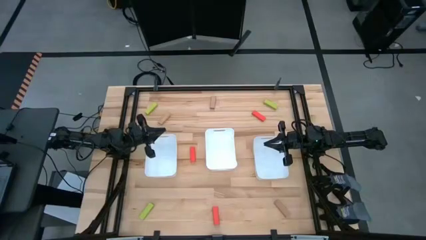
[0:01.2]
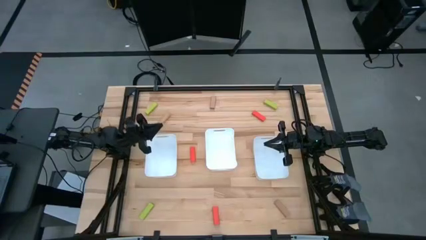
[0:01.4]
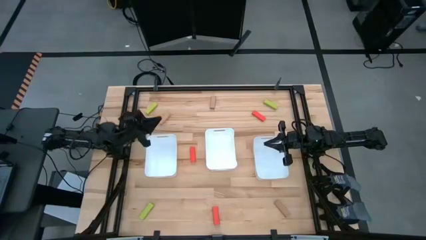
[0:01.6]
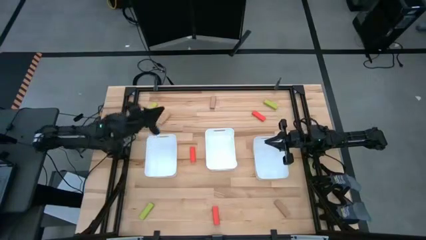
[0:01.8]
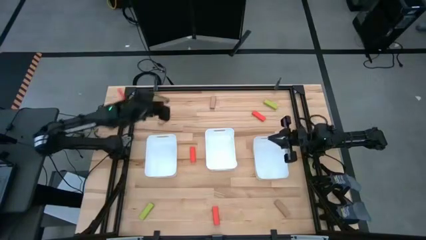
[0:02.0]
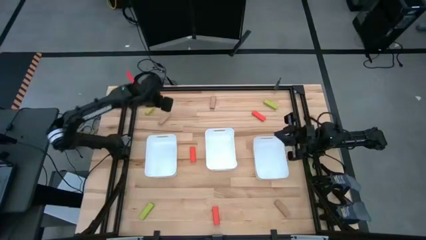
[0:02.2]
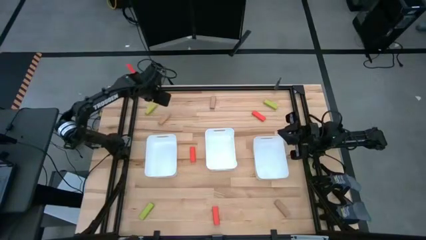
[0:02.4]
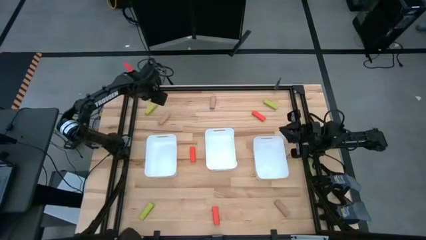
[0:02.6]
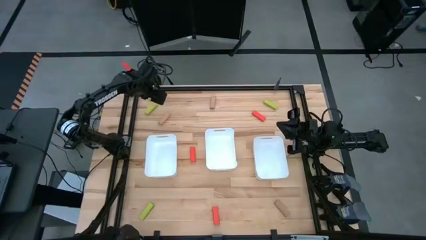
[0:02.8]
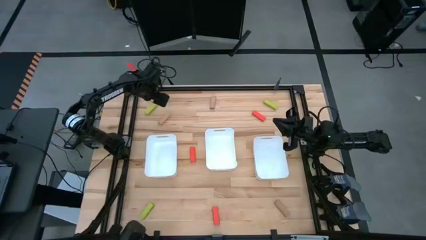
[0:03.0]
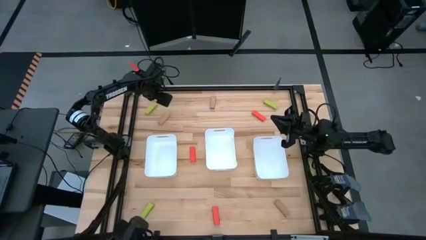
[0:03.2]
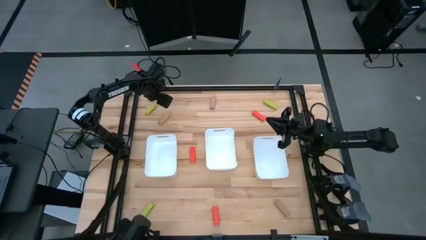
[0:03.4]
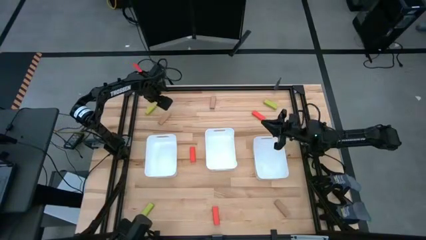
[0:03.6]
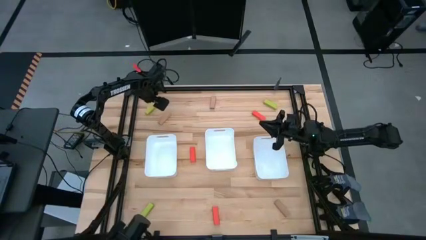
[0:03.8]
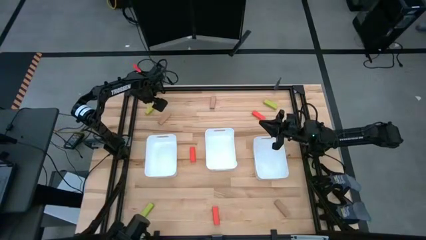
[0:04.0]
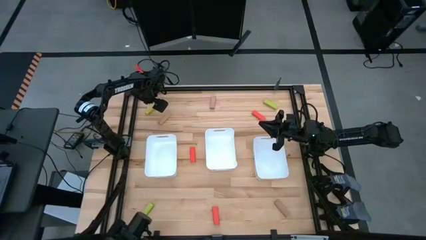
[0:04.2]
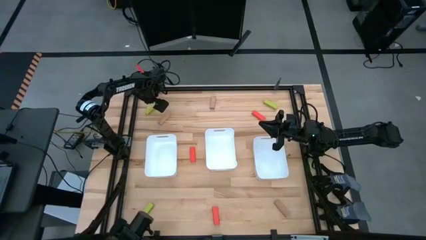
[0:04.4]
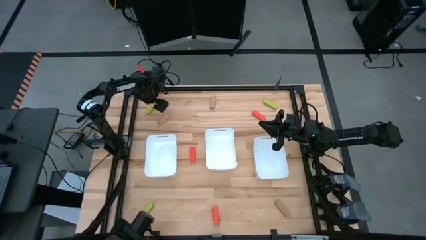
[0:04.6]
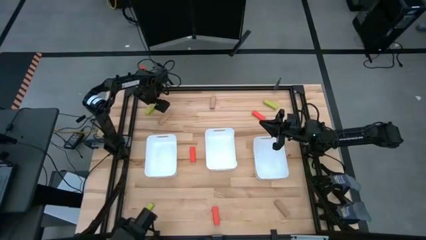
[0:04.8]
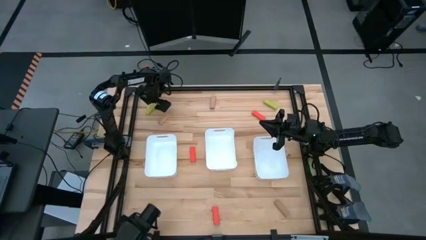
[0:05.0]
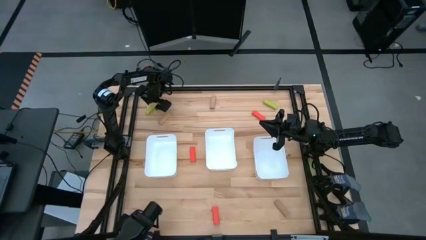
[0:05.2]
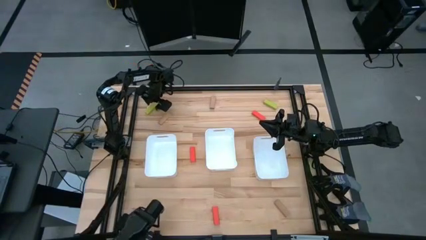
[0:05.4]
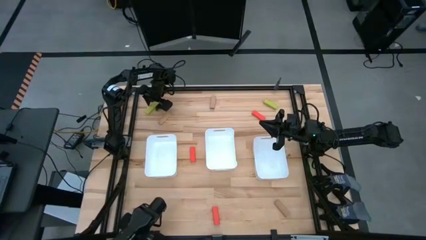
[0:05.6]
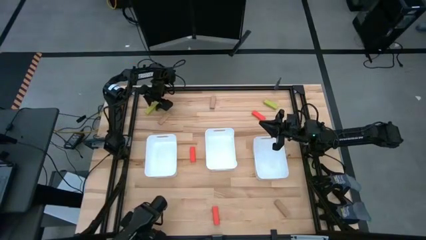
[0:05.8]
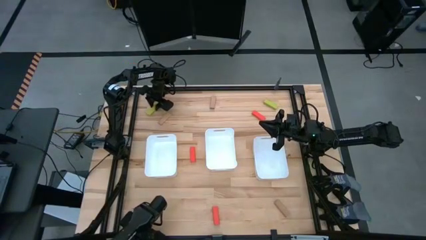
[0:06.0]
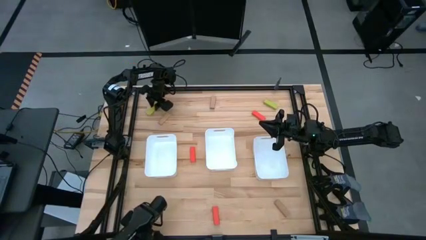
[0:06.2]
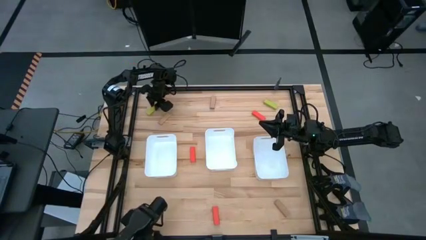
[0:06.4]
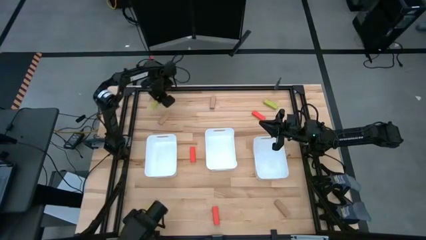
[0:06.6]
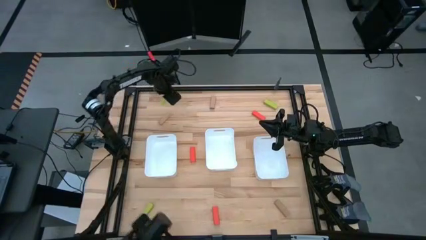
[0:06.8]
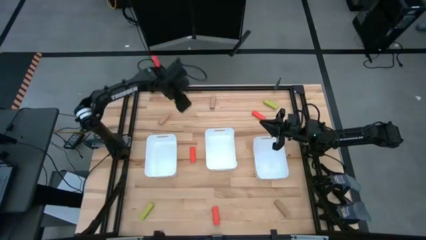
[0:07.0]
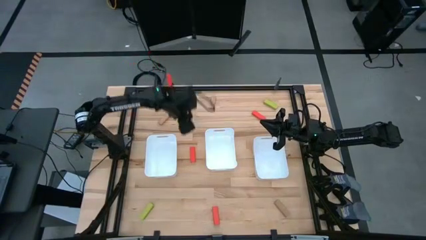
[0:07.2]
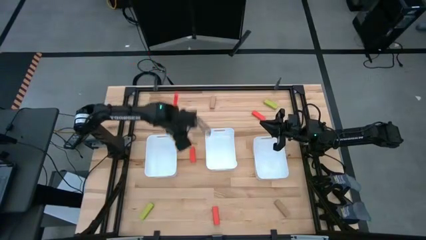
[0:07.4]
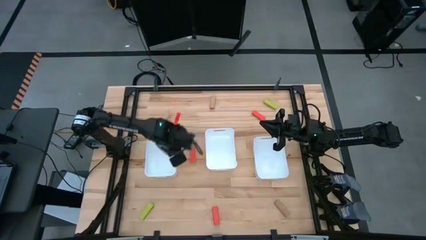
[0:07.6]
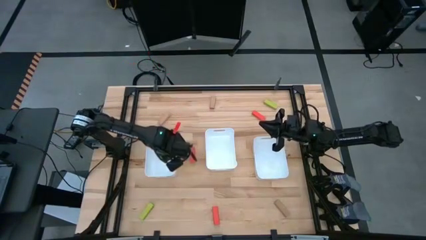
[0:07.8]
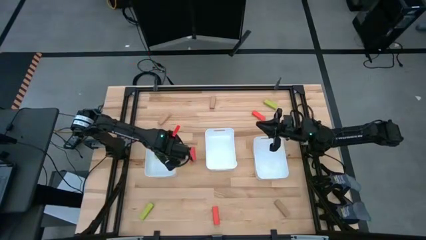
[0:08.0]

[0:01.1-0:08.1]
Task: Sort blocks
Put the top left green block into the left white bin

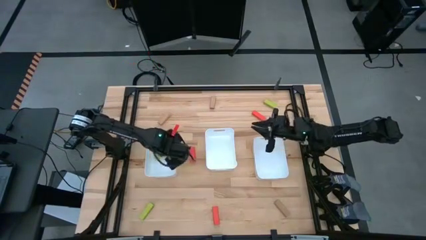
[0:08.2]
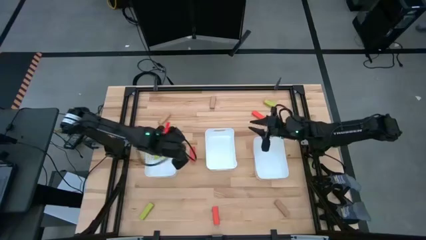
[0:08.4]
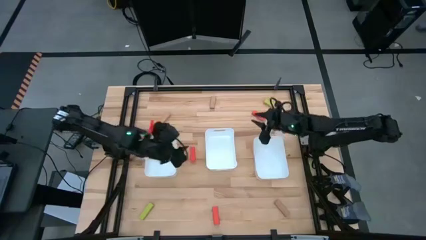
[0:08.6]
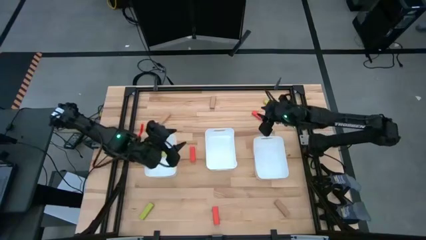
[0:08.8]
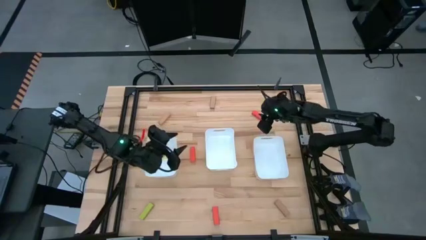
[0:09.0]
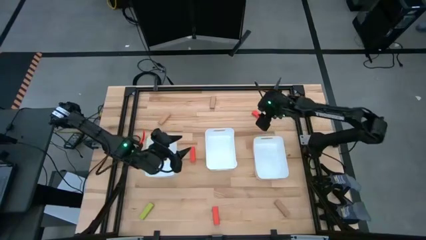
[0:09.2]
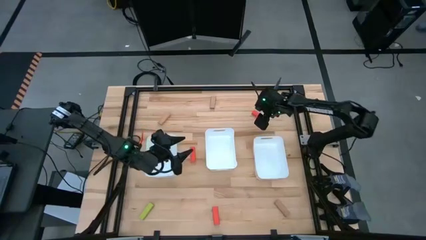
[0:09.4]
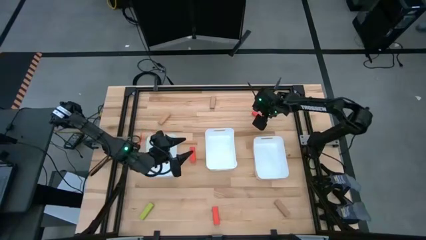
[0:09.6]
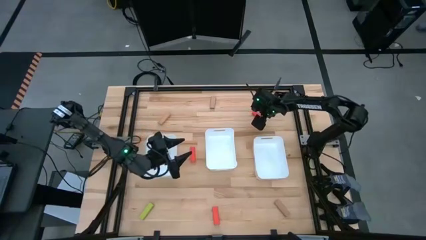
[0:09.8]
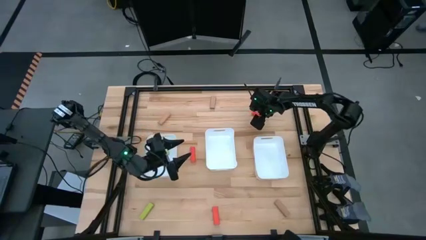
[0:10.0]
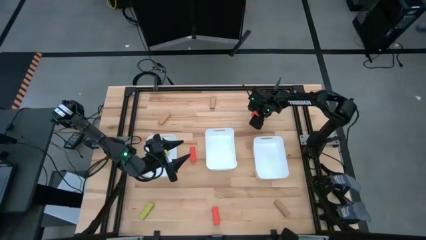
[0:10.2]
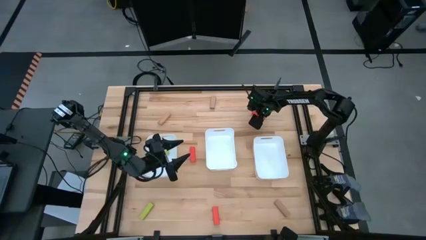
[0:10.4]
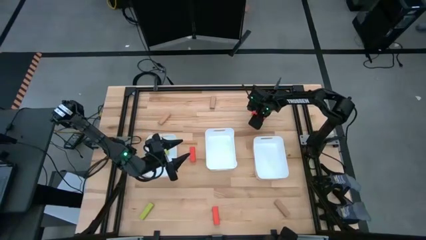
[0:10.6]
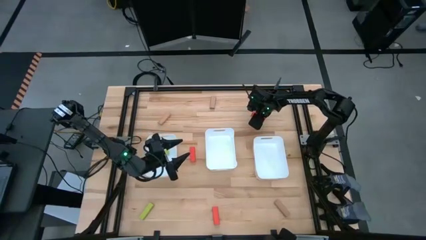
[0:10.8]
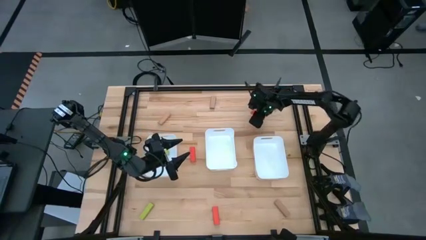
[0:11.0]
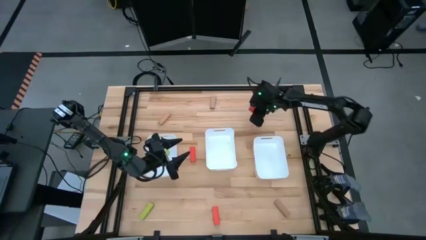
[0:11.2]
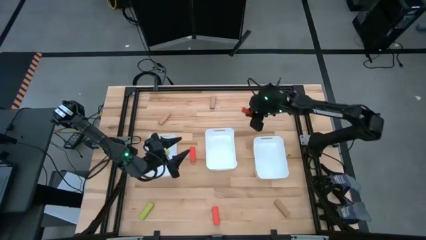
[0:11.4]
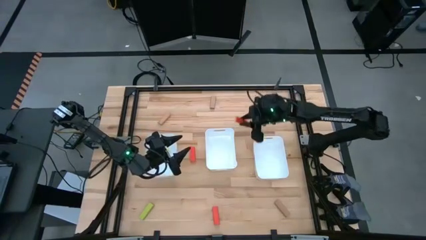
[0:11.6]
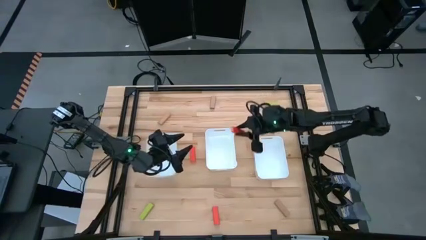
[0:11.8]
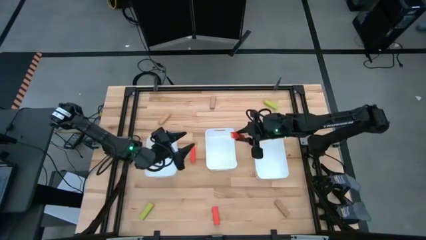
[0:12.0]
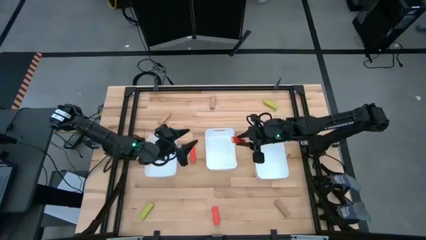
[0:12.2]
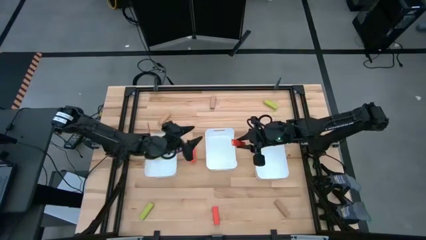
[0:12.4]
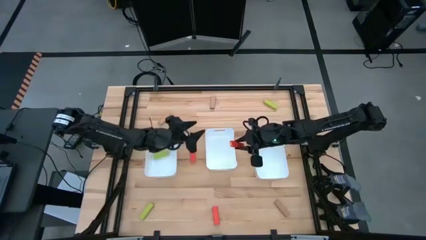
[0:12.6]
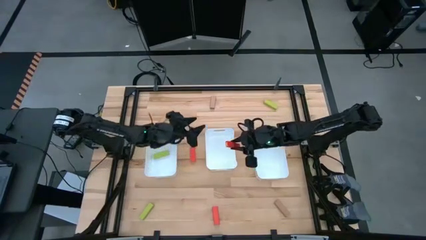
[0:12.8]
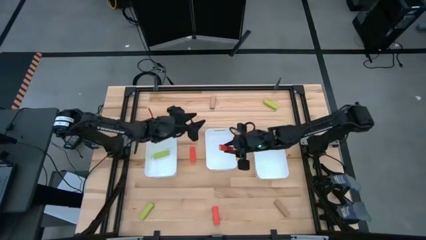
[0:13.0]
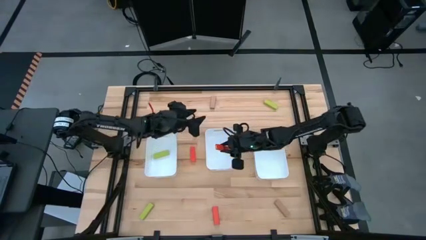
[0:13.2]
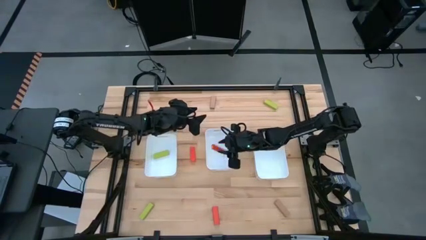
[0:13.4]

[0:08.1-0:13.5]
Put the top orange block into the middle white bin

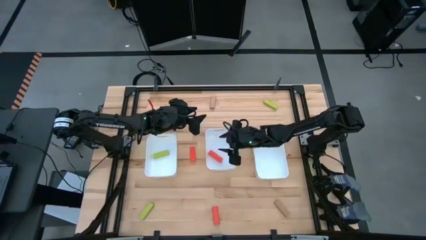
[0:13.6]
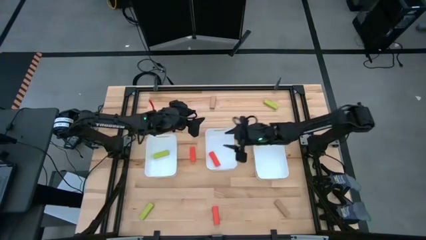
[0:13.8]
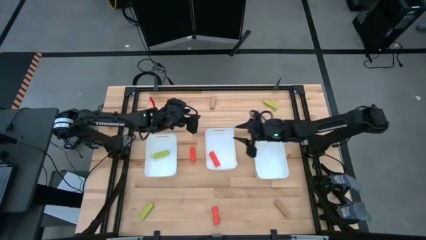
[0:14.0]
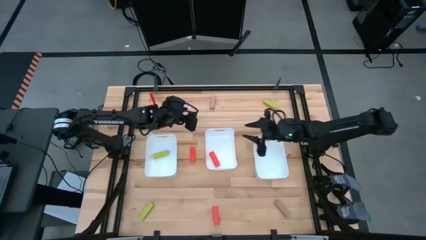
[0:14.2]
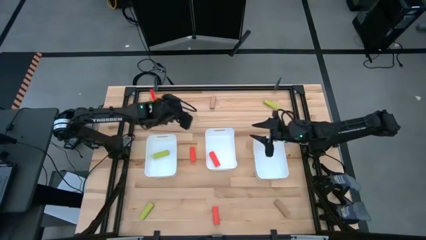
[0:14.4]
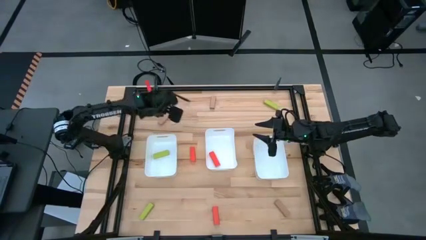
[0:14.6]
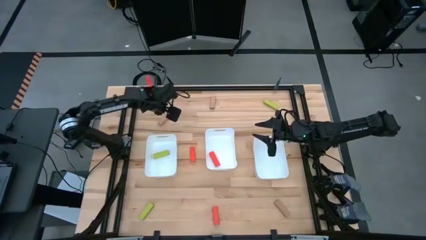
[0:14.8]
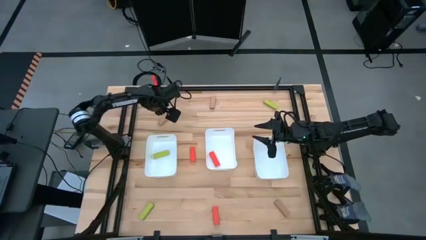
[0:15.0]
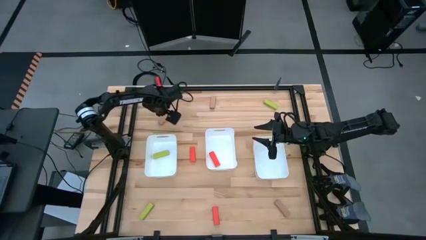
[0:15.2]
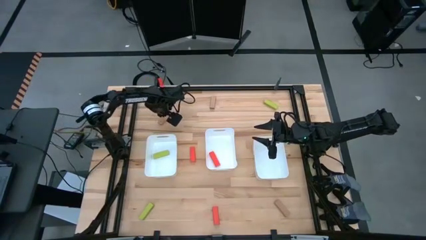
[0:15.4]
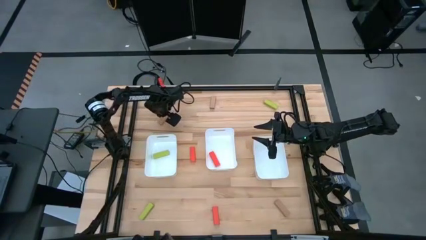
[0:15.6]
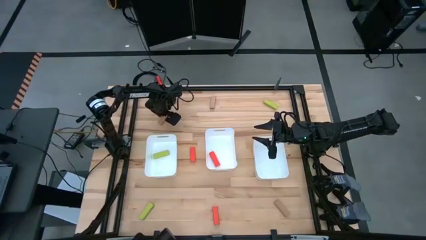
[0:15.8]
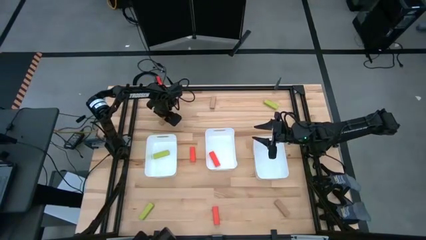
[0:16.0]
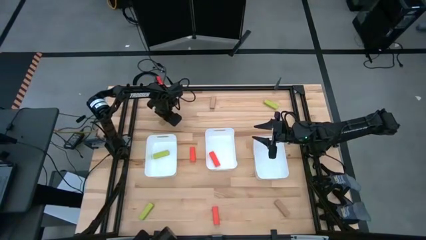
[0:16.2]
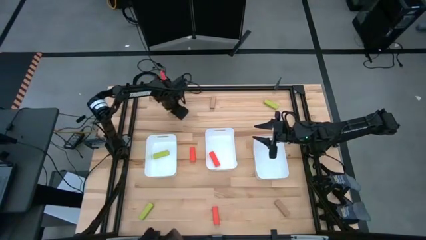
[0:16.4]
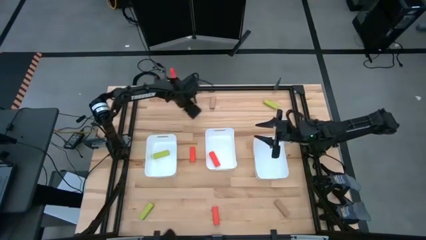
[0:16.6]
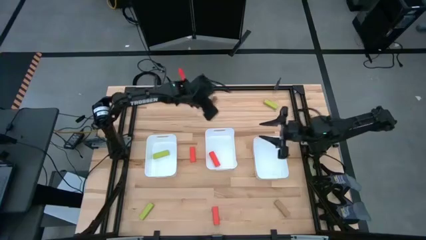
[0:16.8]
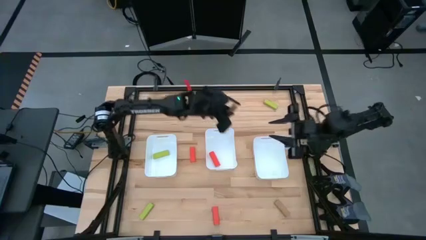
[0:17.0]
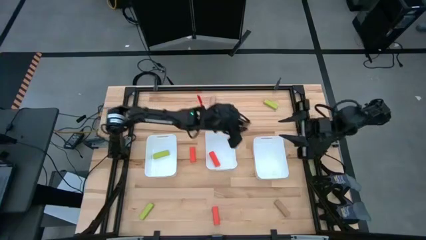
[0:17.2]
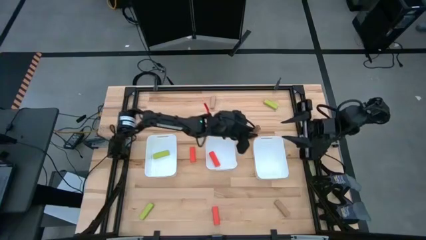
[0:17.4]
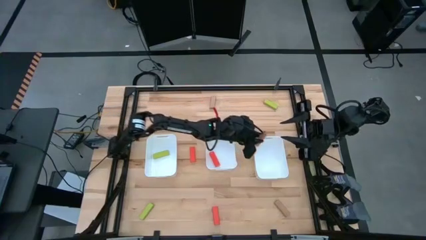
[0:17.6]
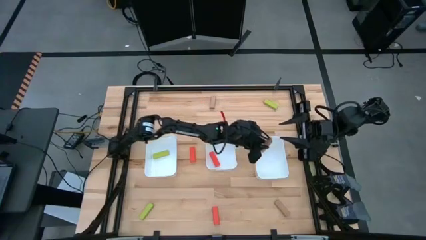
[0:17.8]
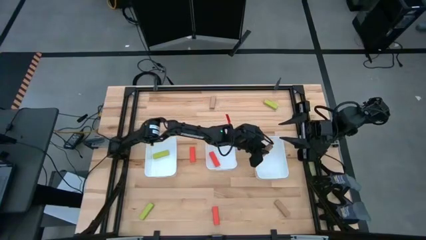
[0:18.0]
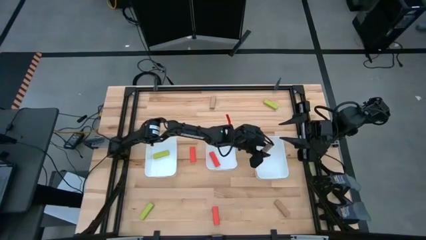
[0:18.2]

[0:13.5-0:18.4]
Put the top left brown block into the right white bin
